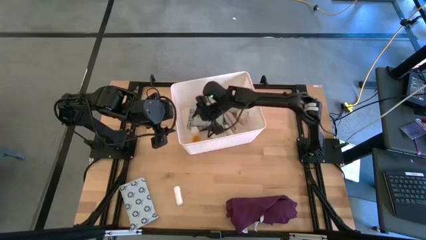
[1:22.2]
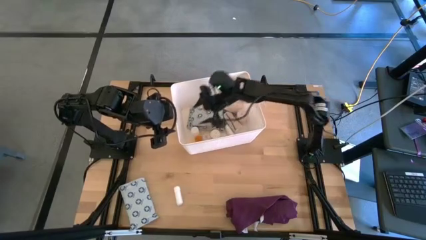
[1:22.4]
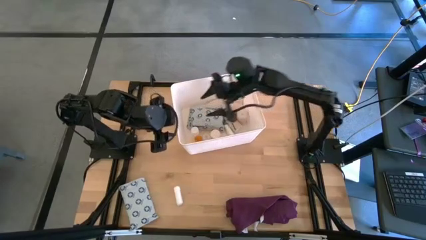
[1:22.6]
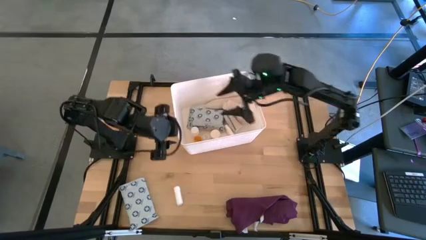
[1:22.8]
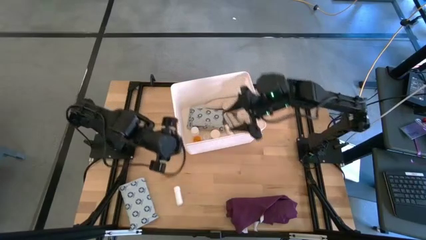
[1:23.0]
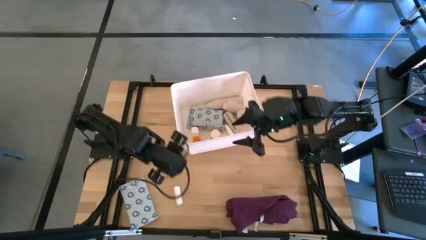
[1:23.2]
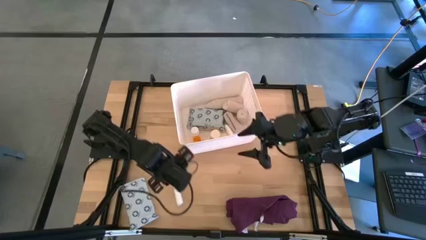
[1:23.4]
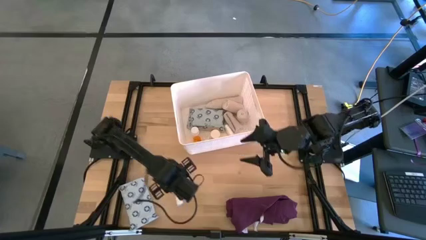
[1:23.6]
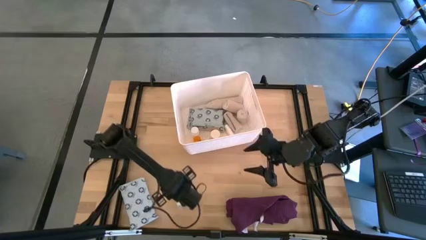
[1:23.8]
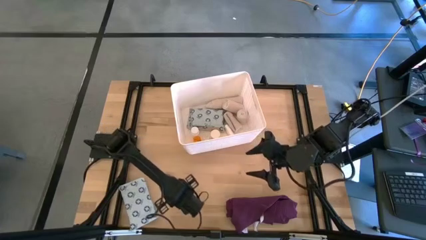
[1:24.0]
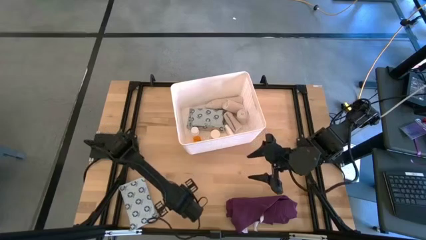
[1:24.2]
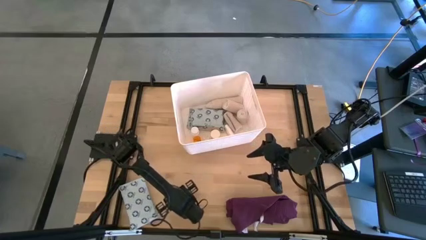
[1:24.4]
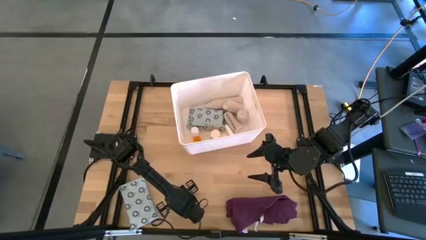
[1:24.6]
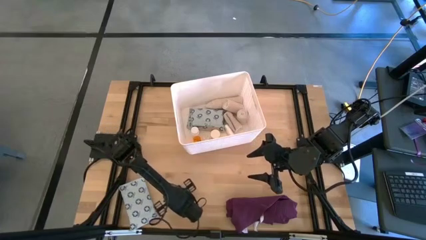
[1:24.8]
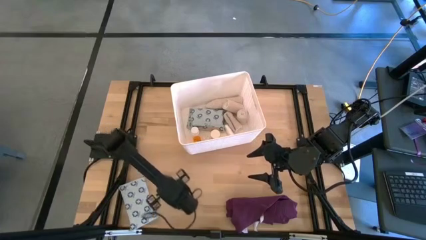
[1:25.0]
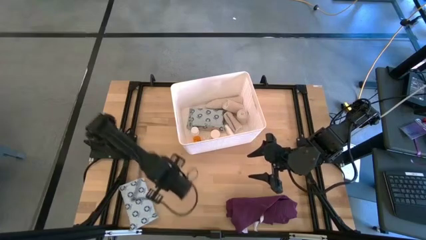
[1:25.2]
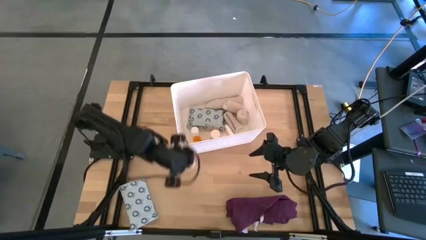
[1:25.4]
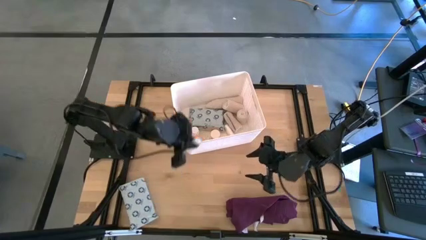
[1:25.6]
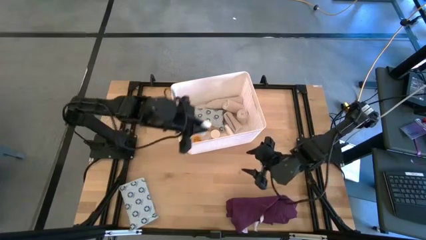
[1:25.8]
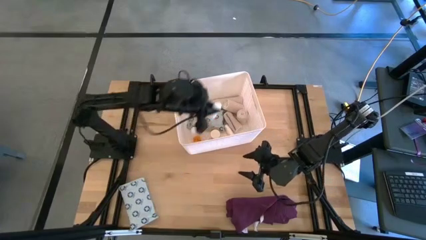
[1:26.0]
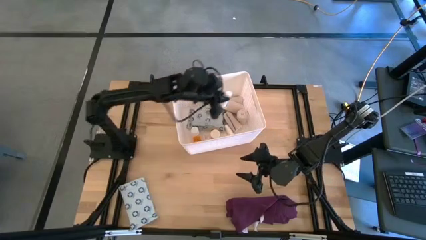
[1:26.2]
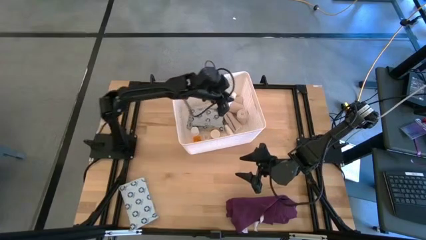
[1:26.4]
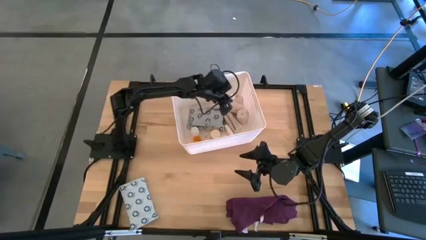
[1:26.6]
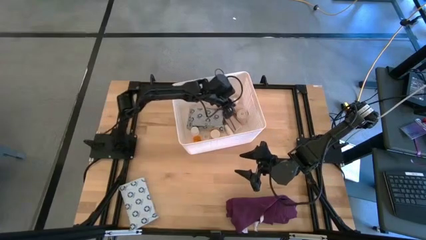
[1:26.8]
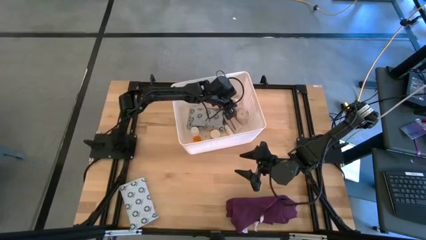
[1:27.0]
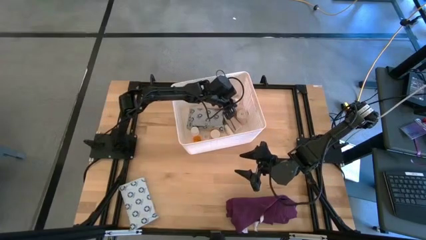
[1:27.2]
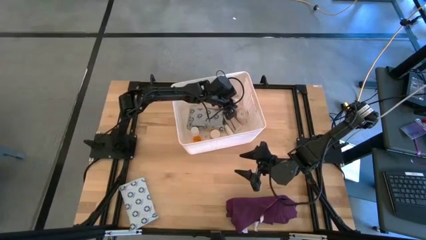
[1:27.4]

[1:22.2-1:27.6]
Task: Pick & place medical supplies in basket/bin
Put the white rolled gauze into the white bin

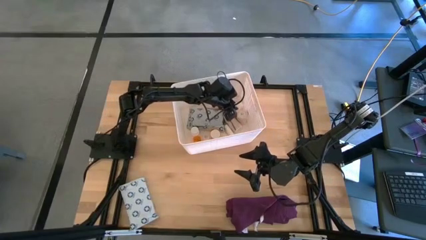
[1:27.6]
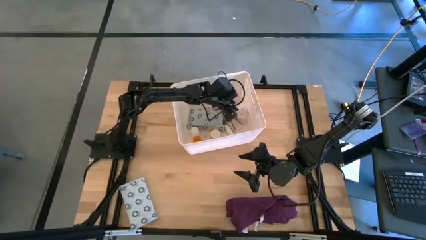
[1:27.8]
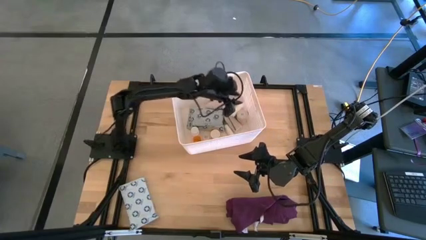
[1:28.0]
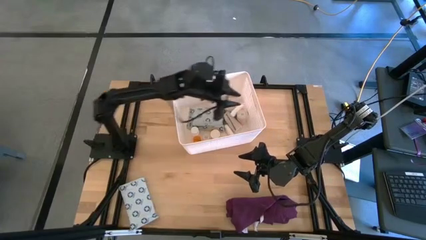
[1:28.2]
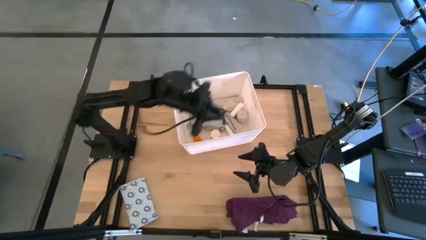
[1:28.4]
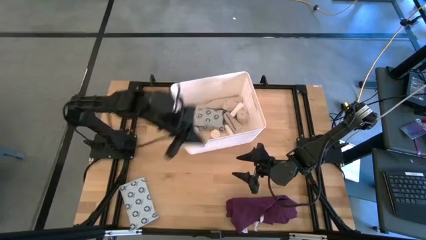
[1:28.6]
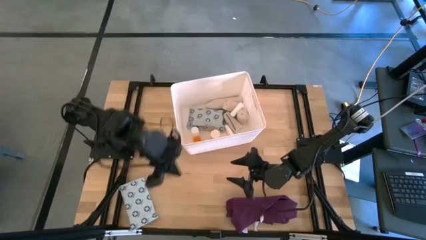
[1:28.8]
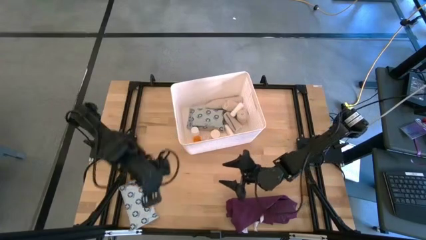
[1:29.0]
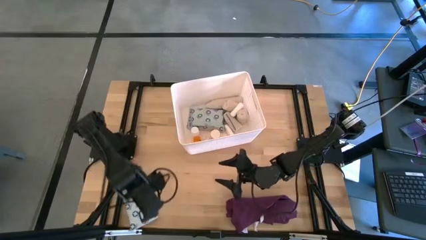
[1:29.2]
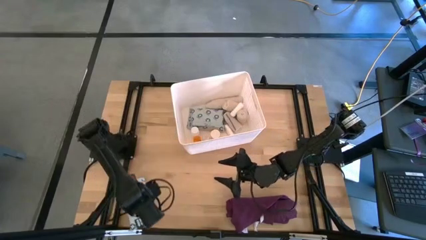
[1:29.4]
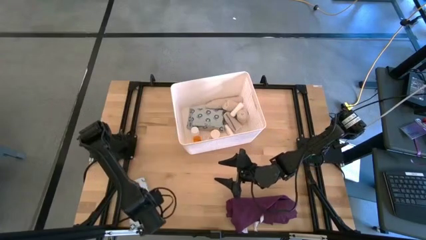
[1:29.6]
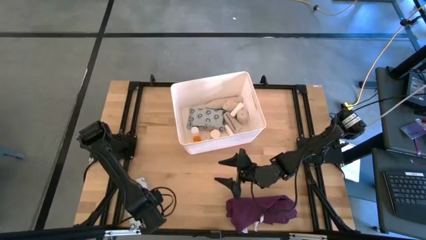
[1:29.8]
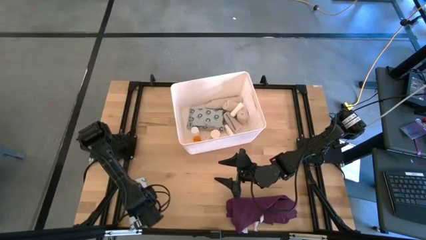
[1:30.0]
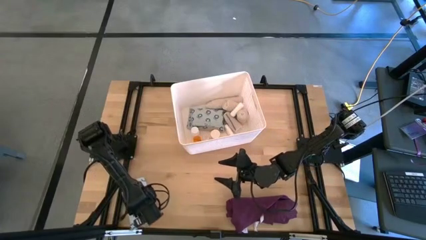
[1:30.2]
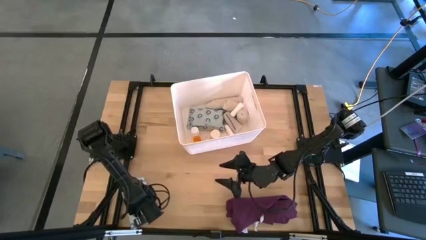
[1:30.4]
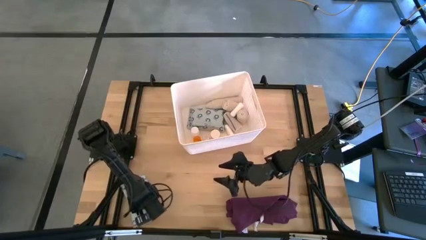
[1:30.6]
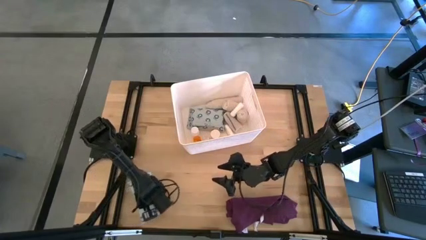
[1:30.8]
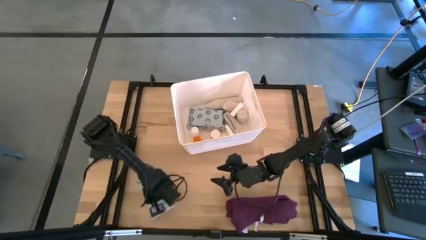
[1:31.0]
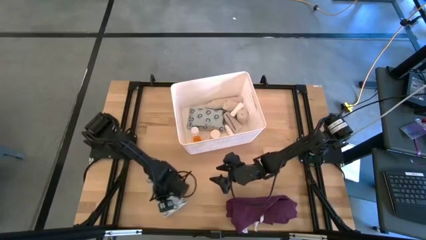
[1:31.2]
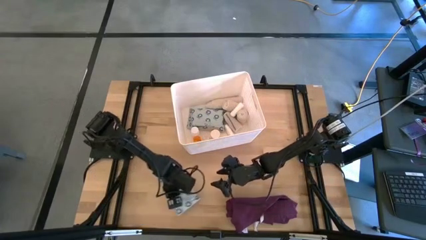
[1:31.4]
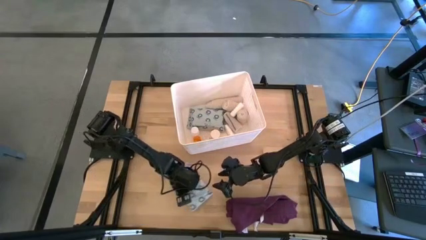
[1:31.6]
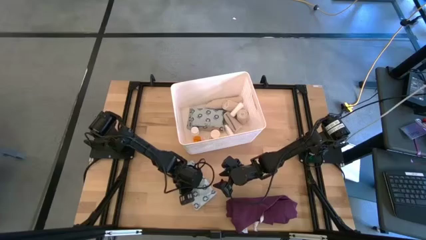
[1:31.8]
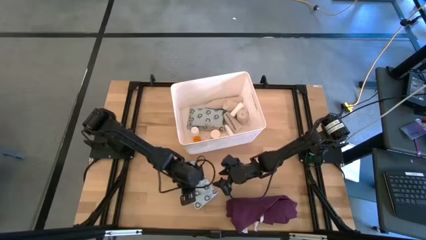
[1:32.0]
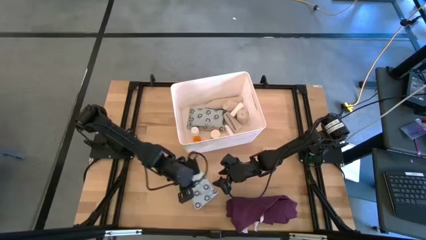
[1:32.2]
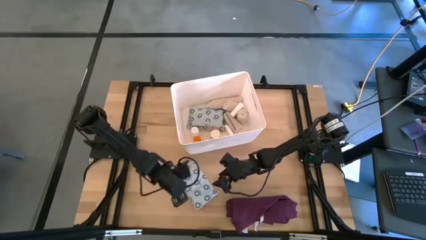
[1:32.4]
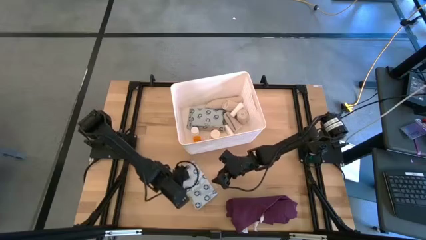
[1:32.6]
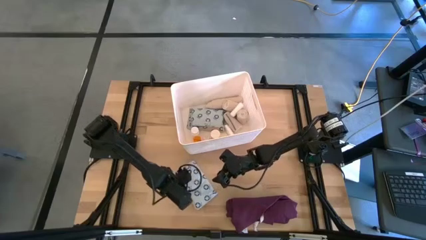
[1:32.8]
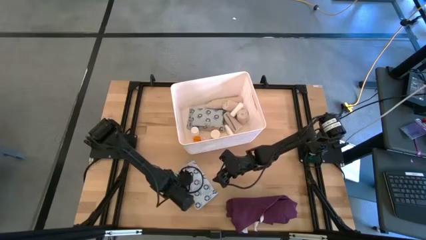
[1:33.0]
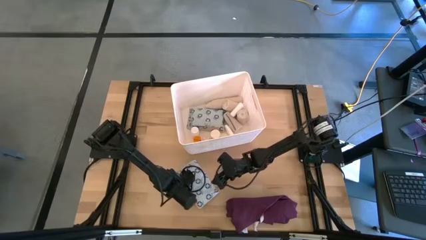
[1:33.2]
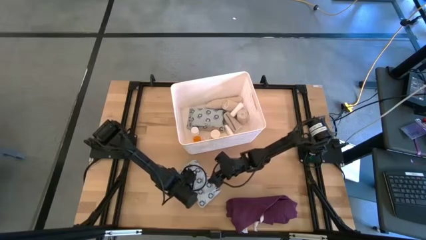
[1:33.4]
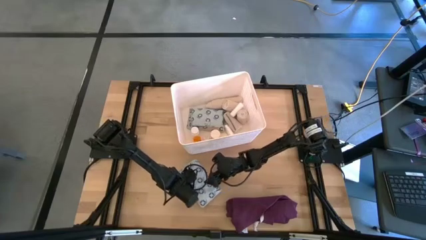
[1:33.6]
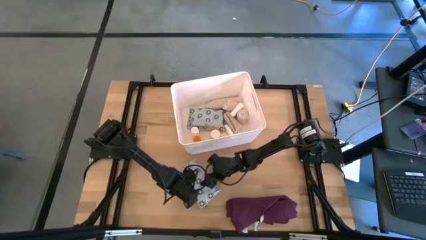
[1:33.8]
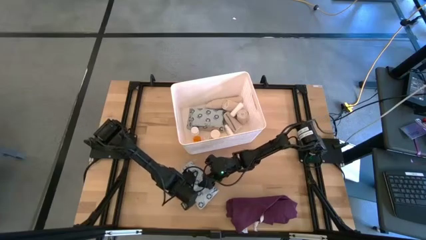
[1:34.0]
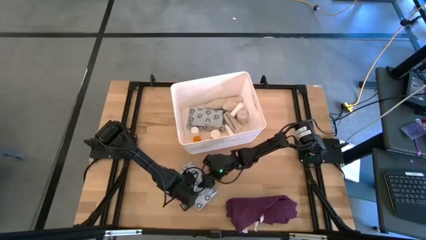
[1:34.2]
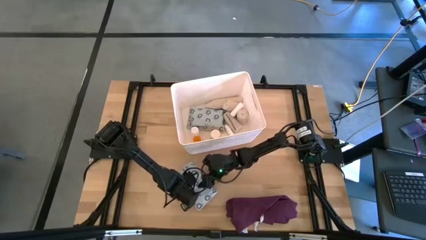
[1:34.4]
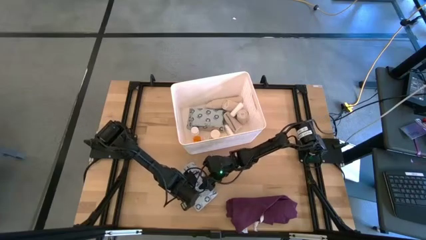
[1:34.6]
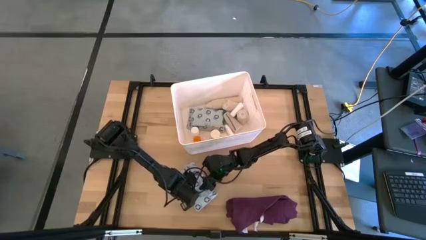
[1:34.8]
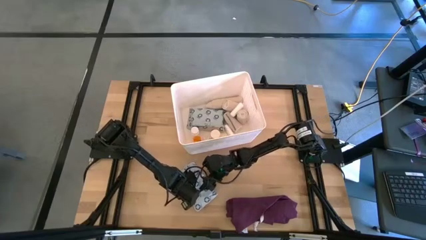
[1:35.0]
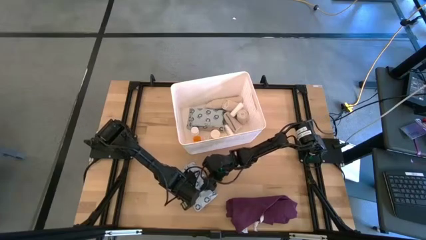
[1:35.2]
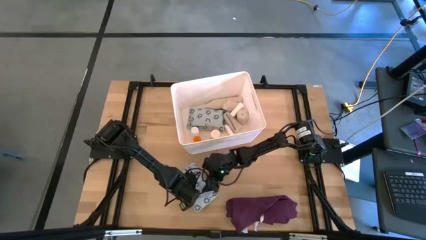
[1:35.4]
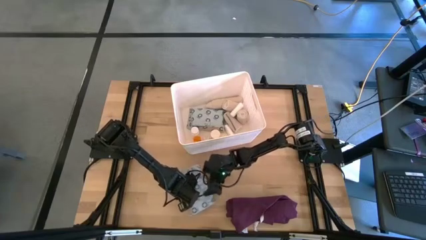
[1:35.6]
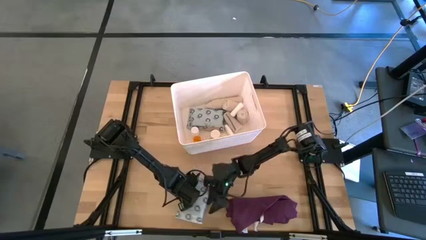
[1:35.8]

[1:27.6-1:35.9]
Put the white mailer bag into the white bin

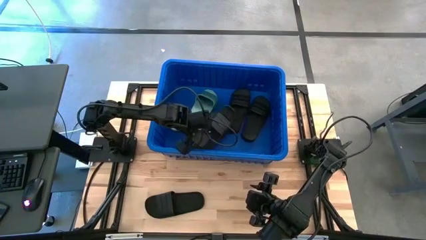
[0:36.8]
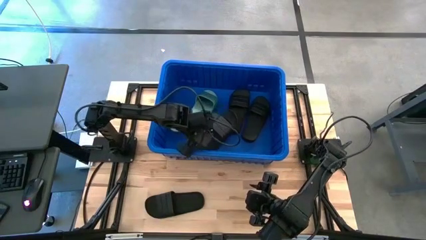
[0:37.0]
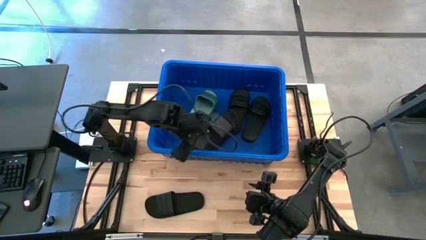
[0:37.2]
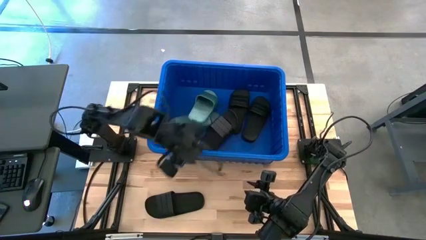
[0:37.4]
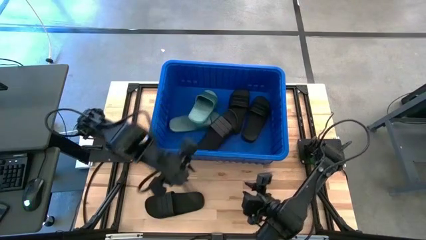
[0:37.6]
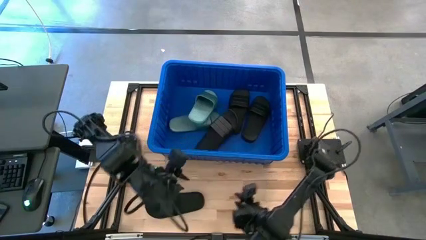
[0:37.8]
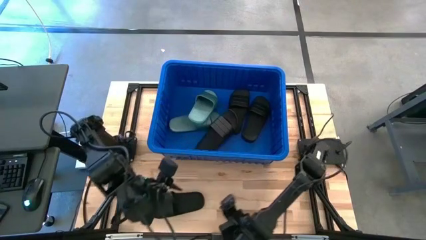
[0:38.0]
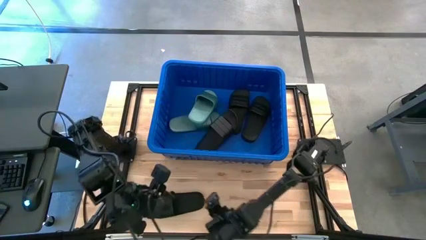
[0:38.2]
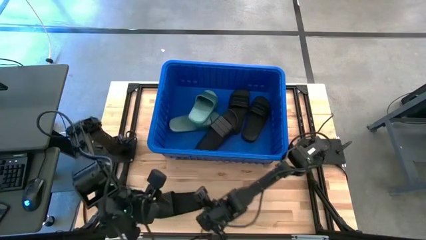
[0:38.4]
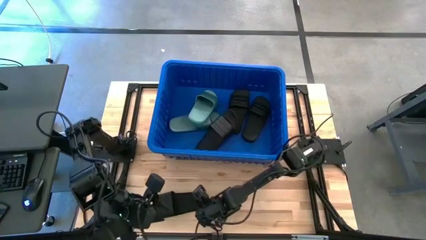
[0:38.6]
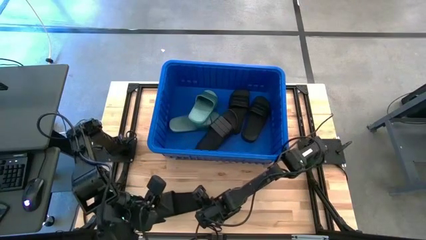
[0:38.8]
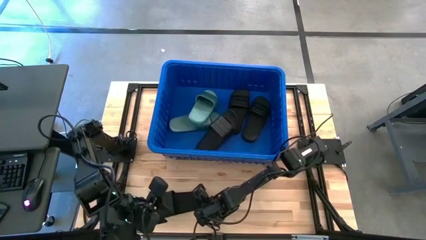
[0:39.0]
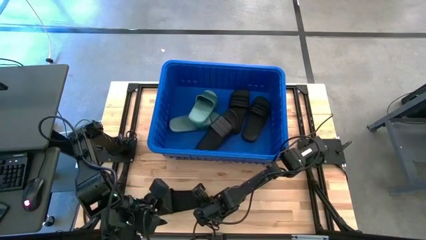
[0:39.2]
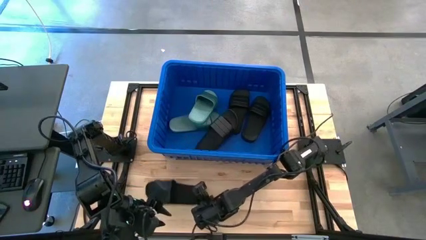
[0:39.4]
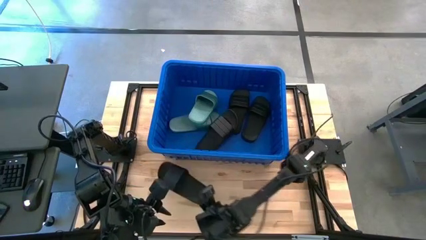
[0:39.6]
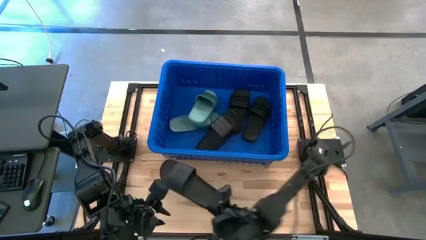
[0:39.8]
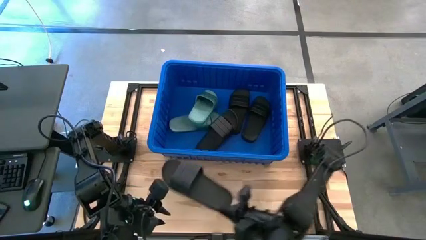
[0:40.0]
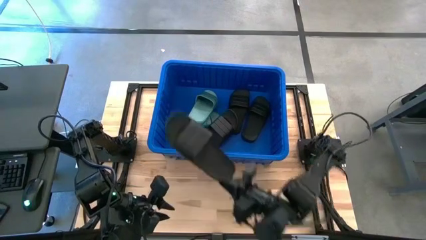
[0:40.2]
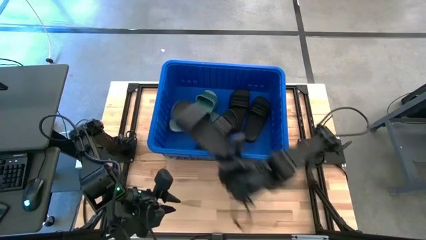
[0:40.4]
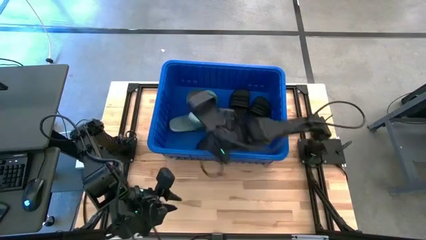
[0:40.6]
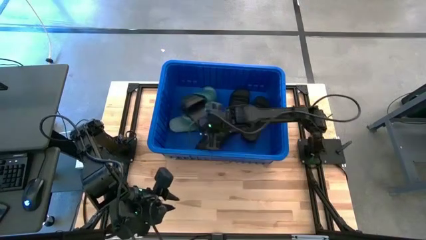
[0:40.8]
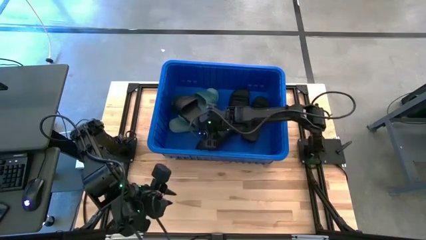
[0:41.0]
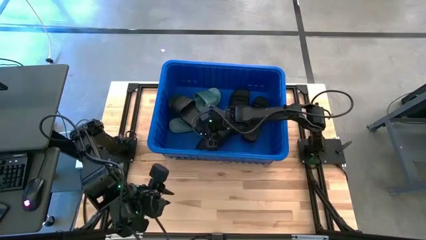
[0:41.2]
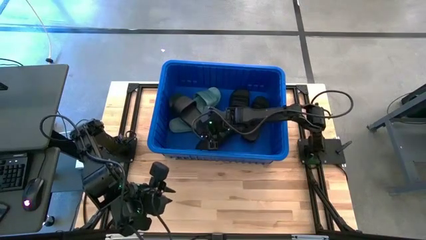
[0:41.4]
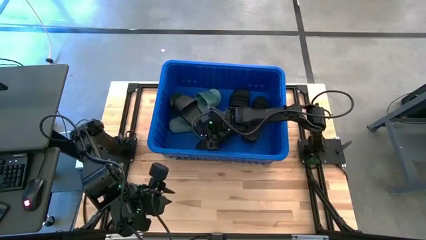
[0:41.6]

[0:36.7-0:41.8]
Task: Pick and place slides into bin
Put the black slipper into the blue bin
